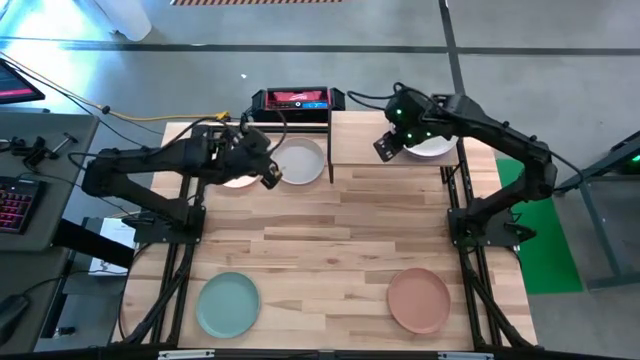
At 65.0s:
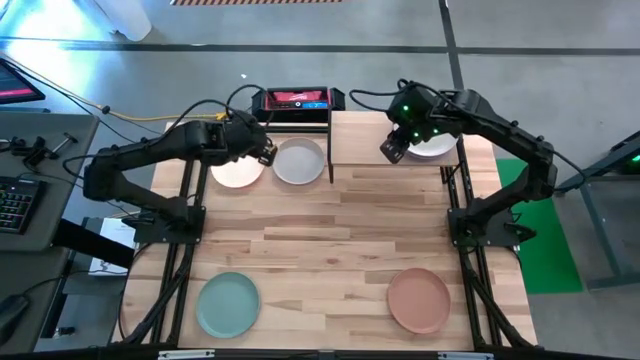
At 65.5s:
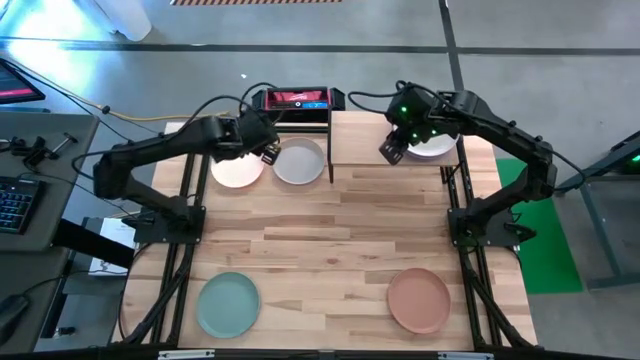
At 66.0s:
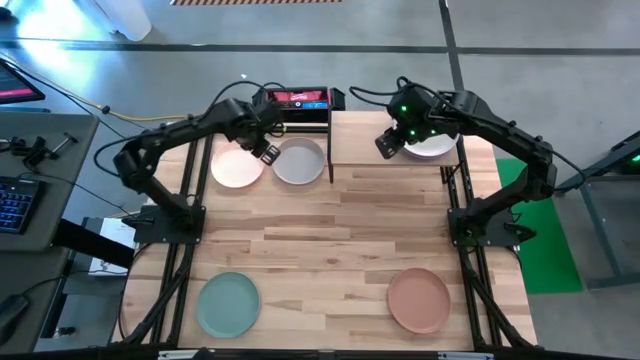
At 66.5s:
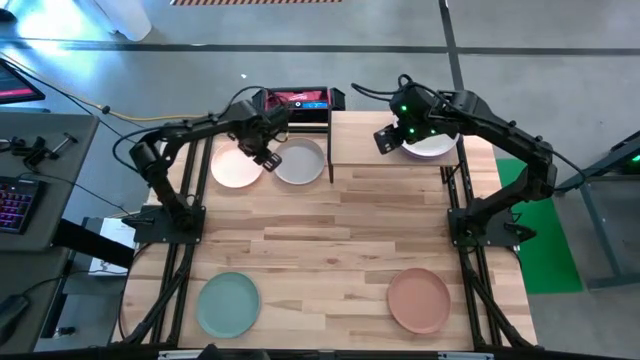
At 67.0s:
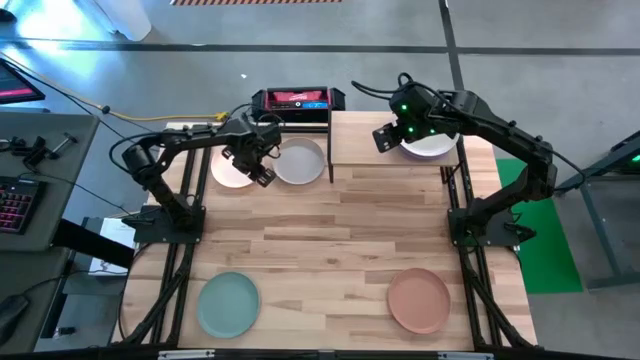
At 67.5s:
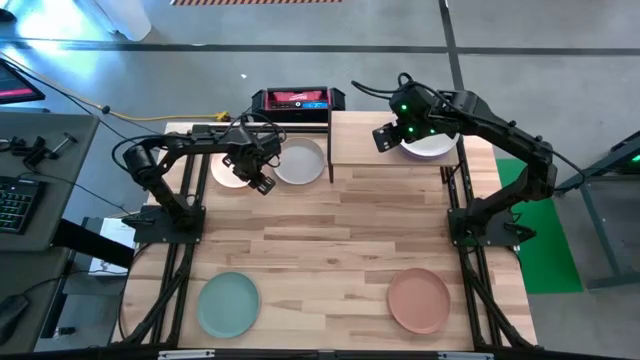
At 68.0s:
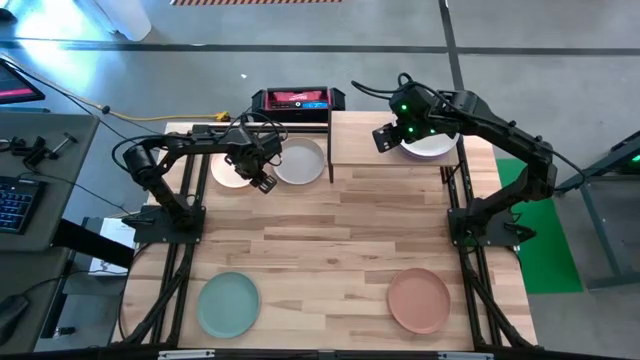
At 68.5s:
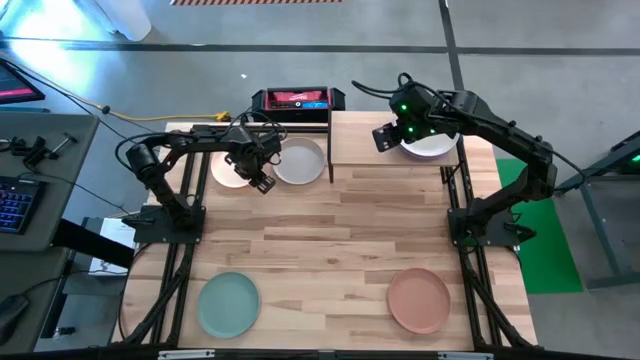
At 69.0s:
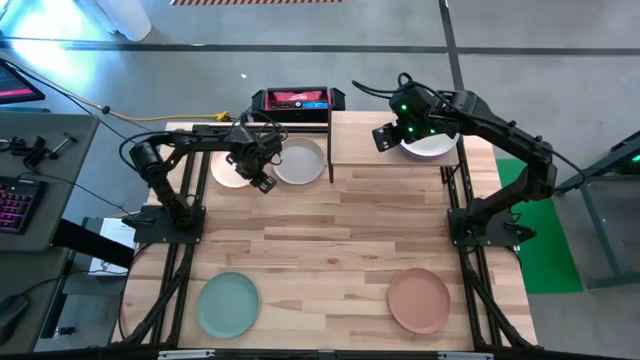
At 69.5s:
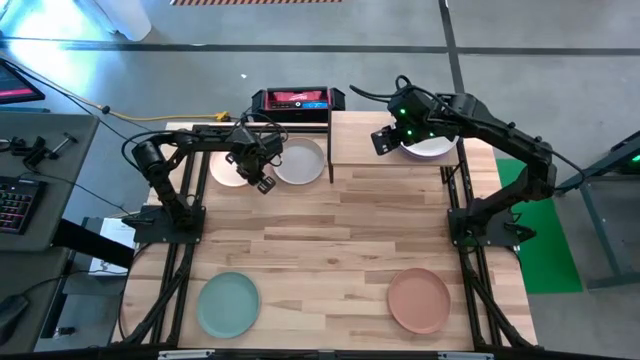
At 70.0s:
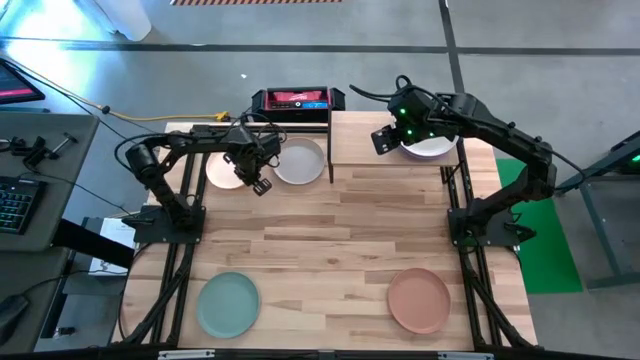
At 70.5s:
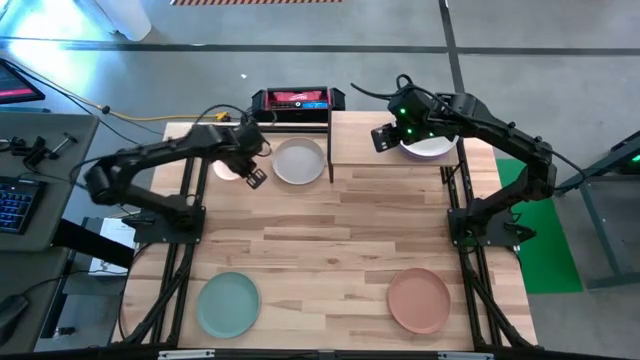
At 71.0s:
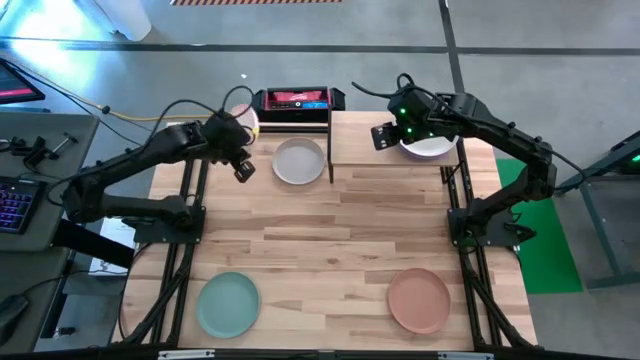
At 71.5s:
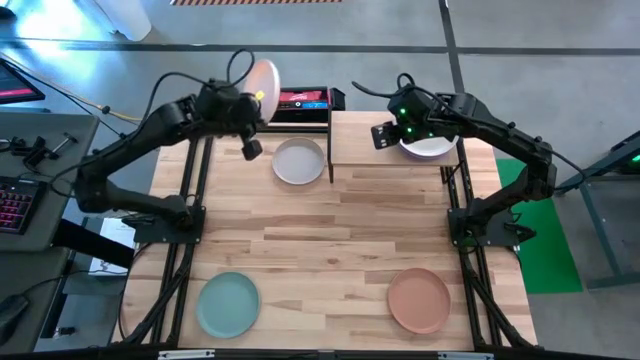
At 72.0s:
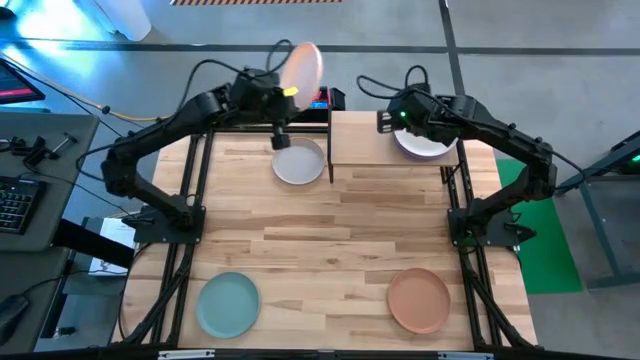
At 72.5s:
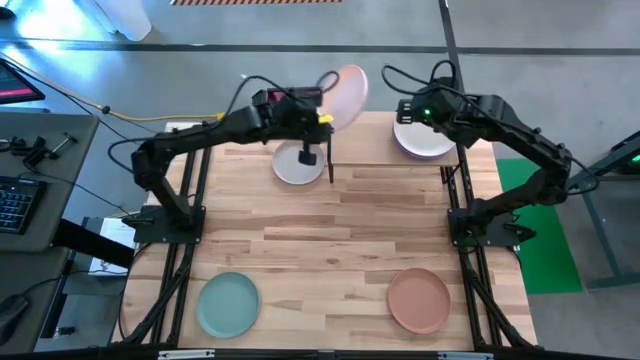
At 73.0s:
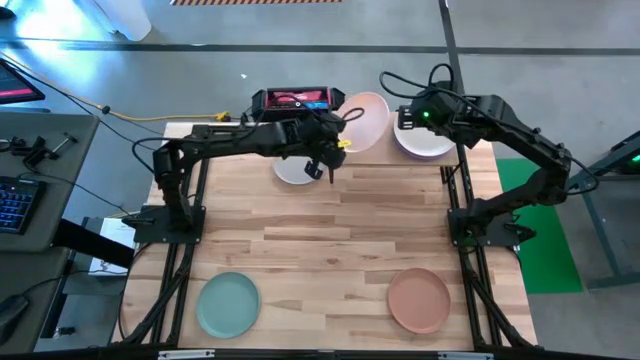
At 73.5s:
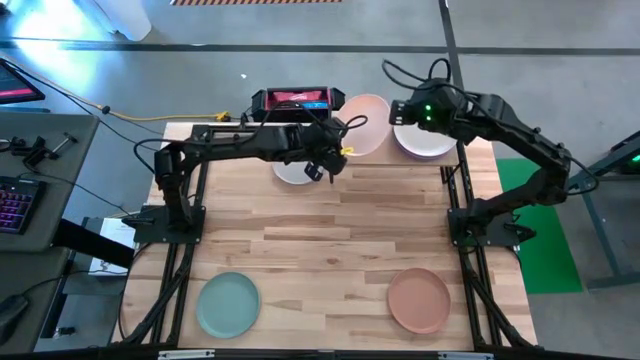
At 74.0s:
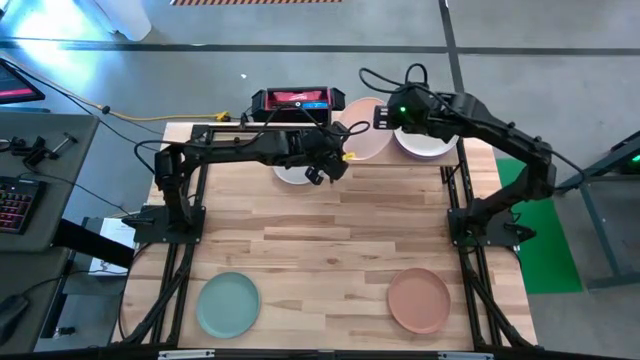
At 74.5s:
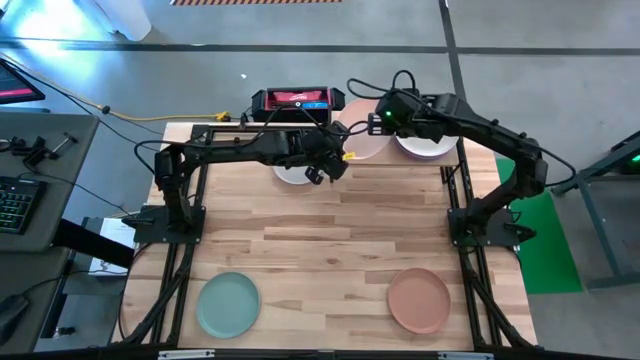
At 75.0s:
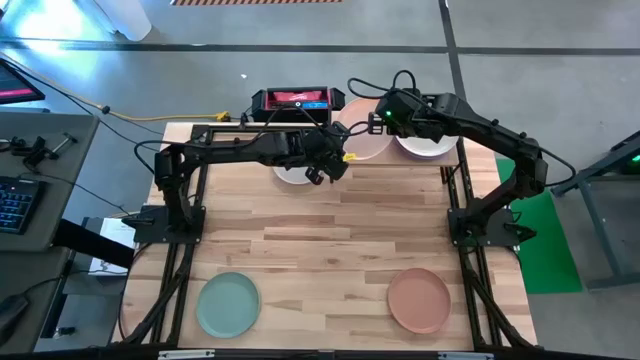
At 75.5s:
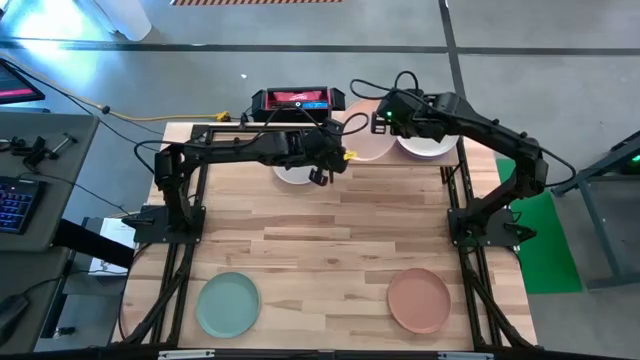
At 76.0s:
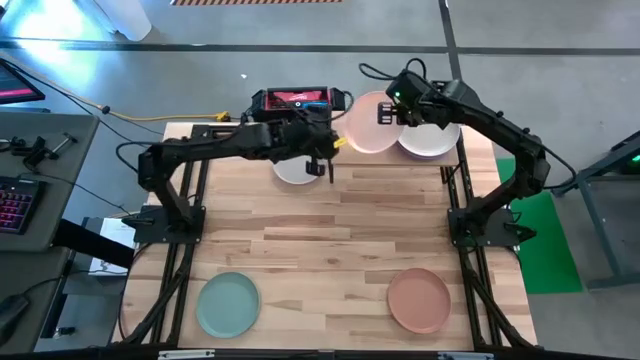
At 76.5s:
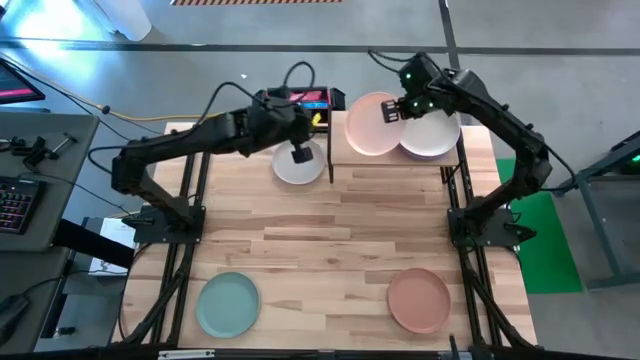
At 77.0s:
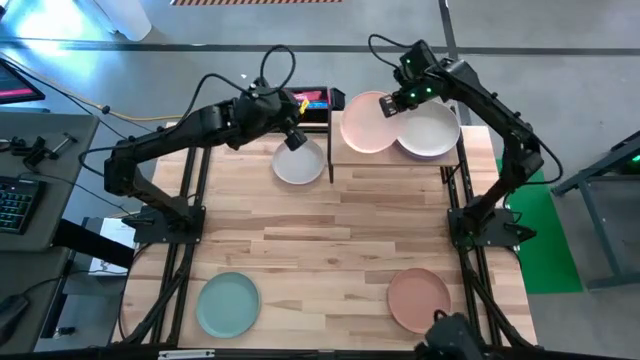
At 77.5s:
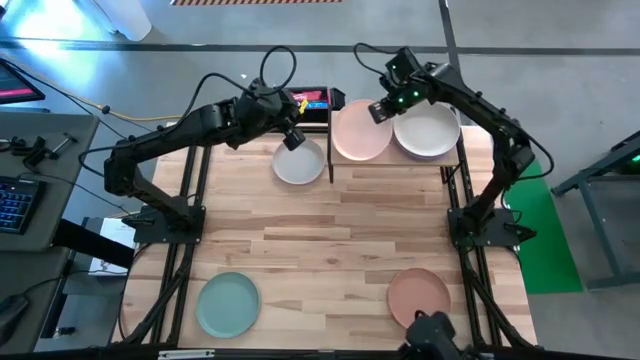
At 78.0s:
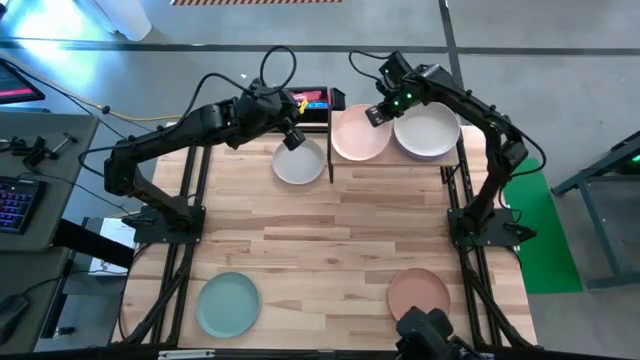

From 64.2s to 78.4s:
Task: Place and stack plates onto a shelf
Put the peach plate on the shelf

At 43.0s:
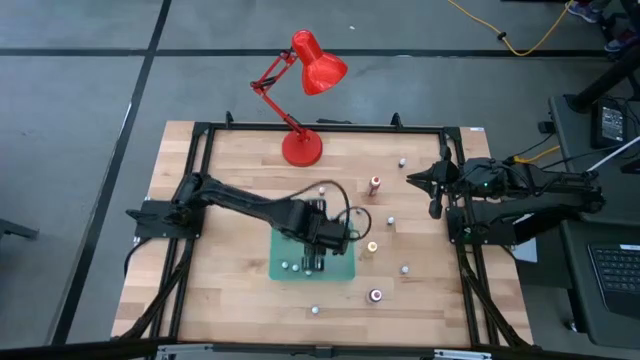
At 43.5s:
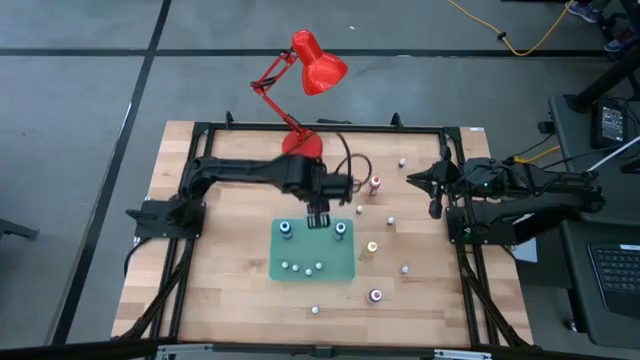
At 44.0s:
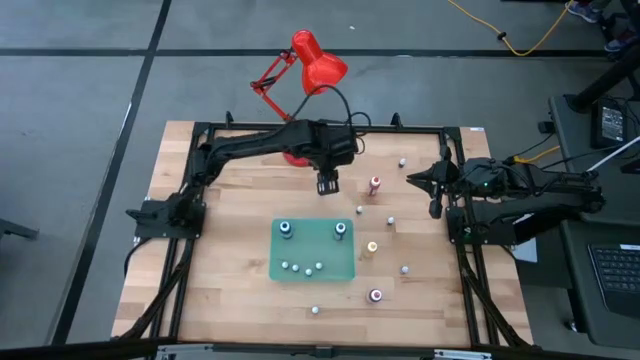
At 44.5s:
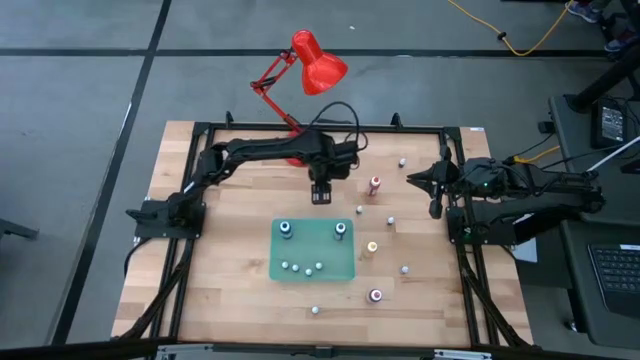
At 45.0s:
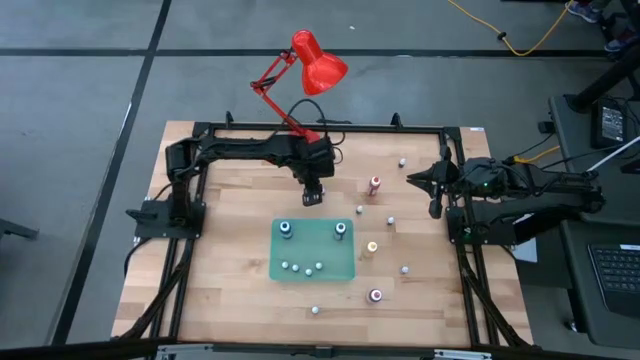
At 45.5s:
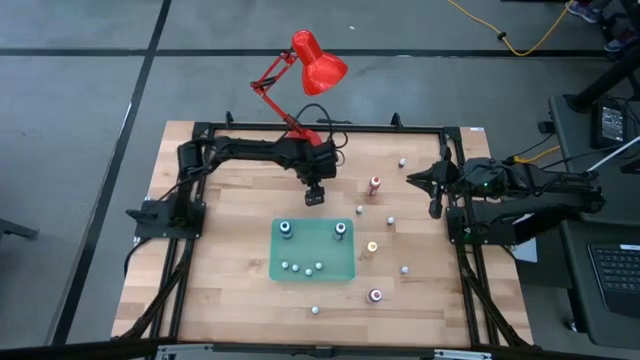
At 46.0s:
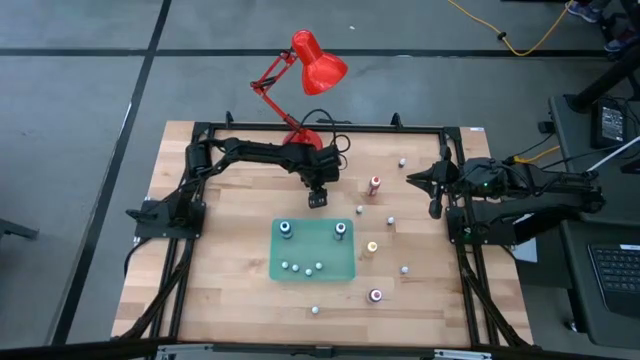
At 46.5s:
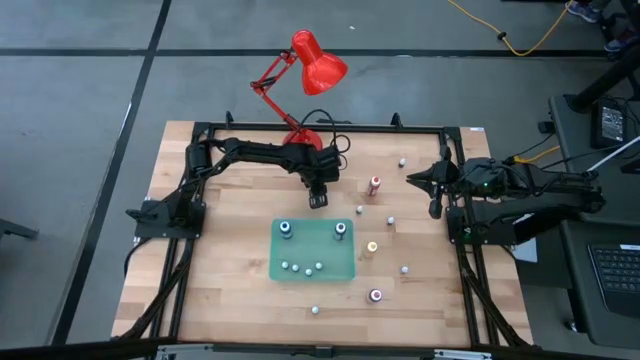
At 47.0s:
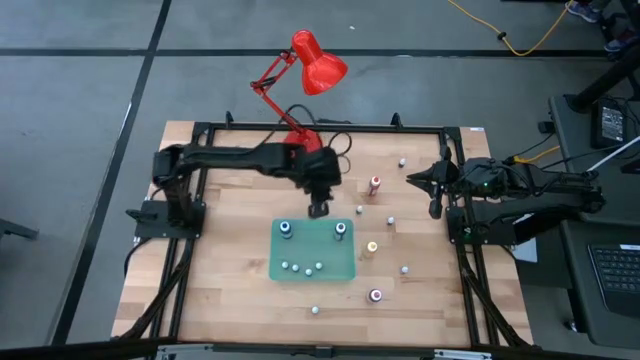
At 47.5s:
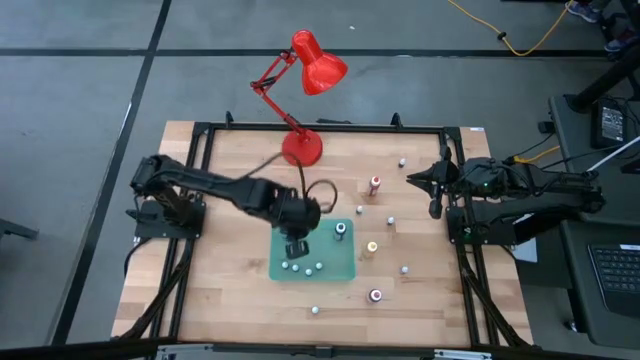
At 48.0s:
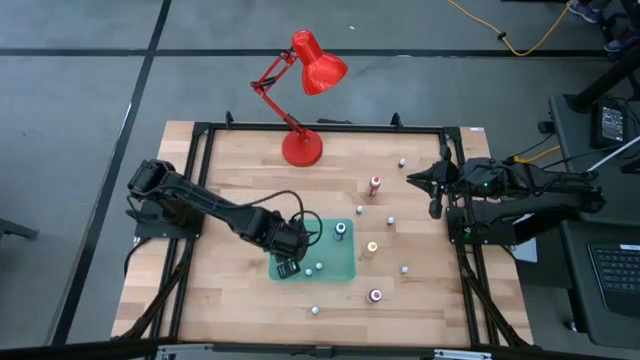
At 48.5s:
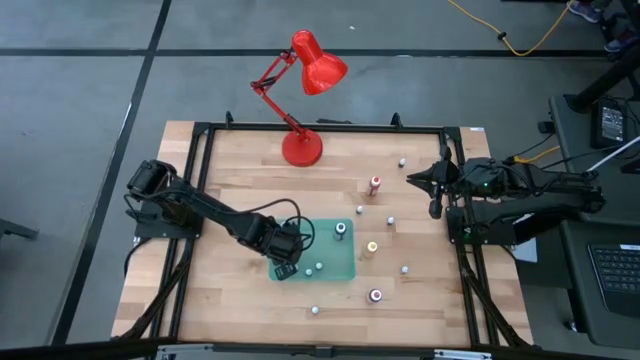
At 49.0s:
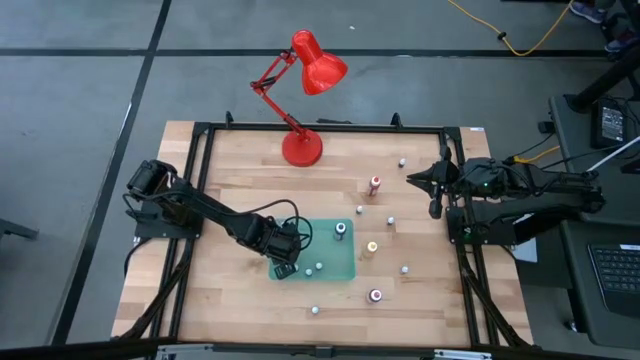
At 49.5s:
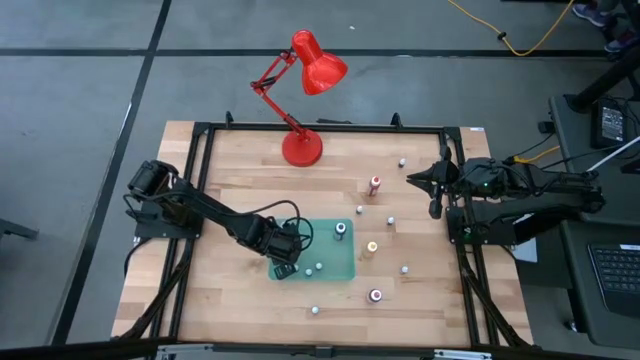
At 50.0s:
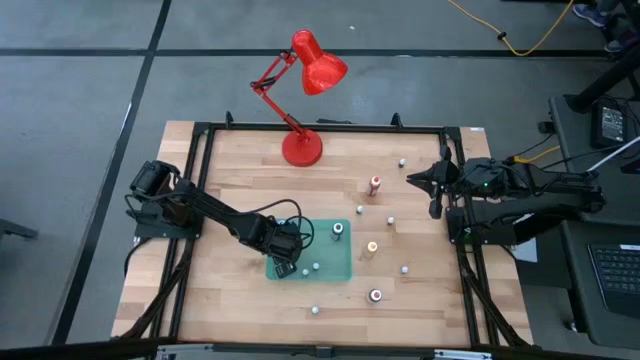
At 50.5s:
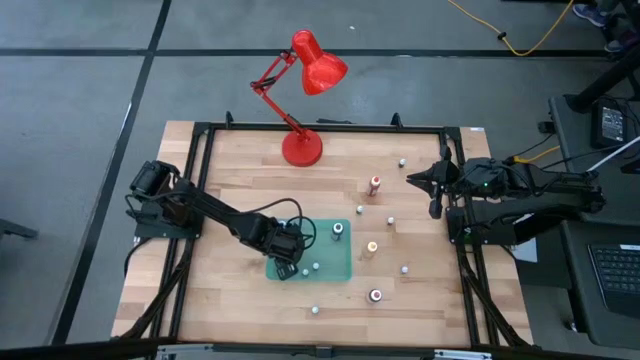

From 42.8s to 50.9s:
Task: Pick & Place food coloring
Put the small black bottle into the green bin
